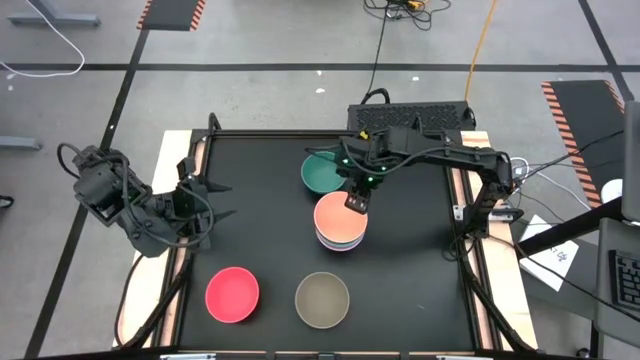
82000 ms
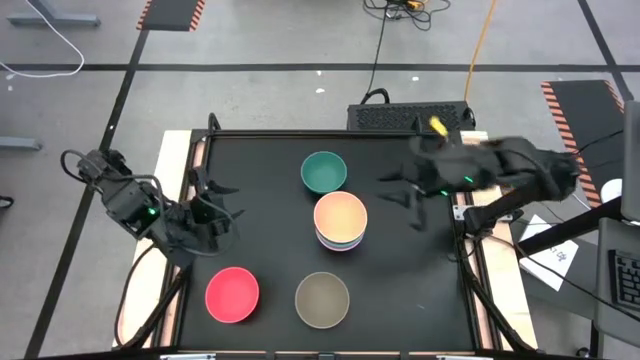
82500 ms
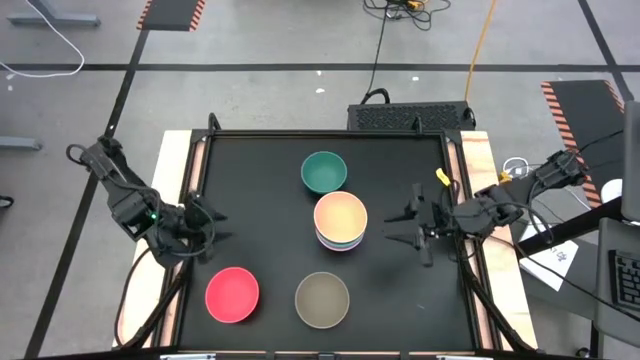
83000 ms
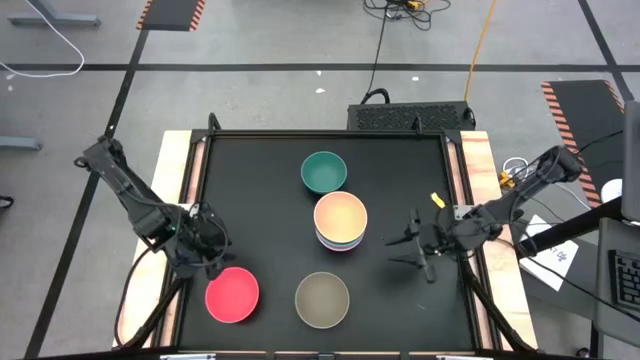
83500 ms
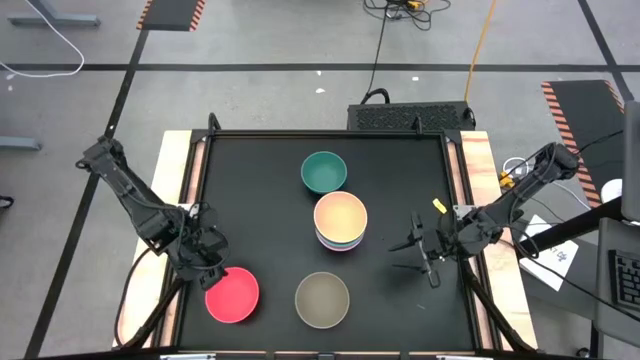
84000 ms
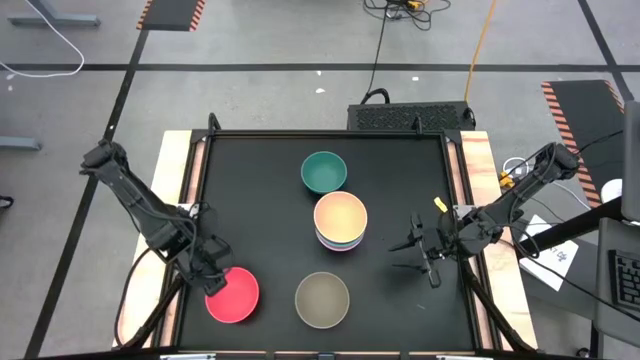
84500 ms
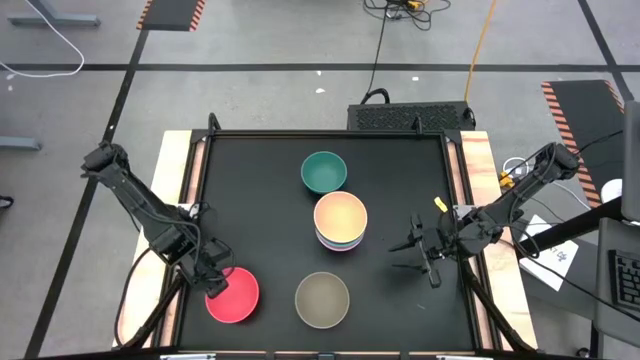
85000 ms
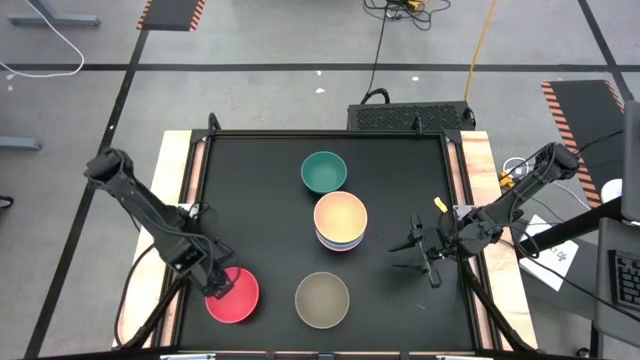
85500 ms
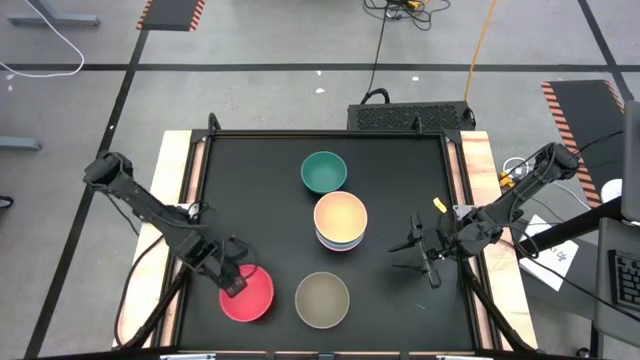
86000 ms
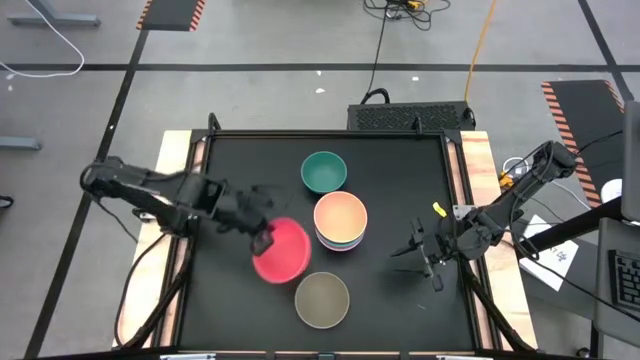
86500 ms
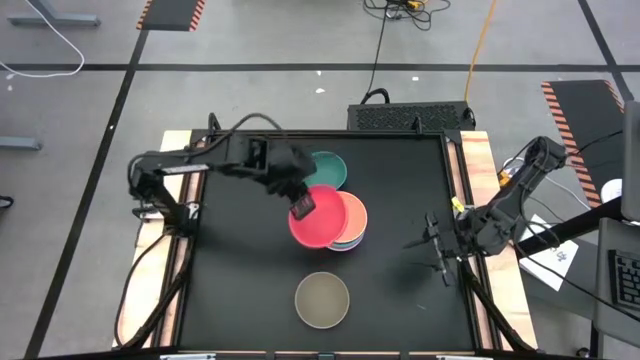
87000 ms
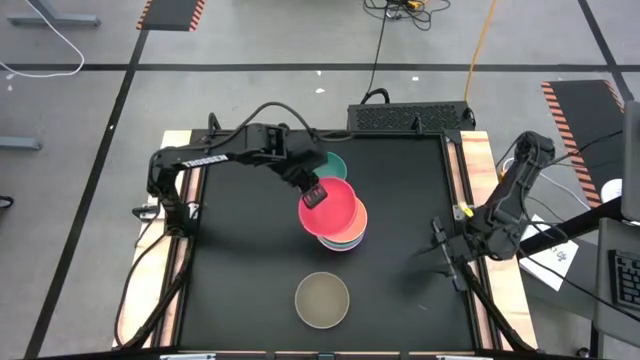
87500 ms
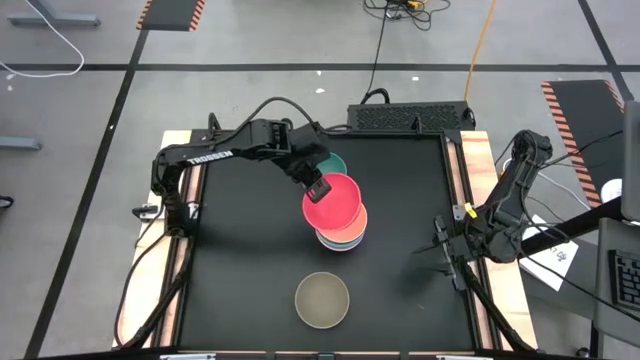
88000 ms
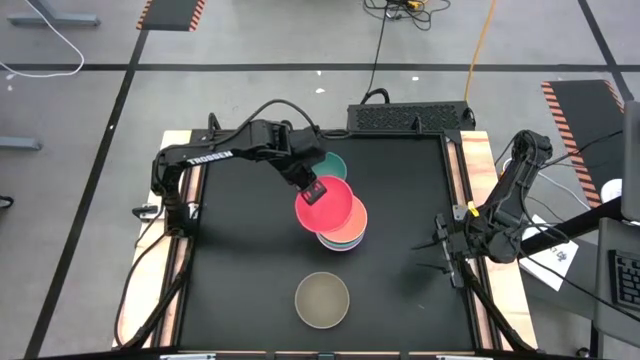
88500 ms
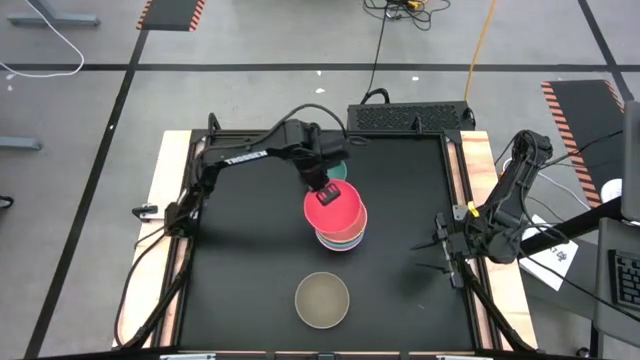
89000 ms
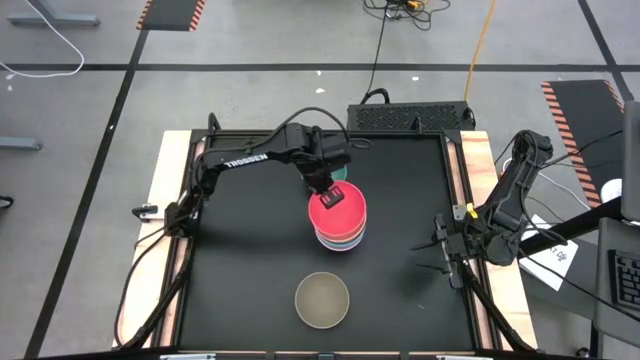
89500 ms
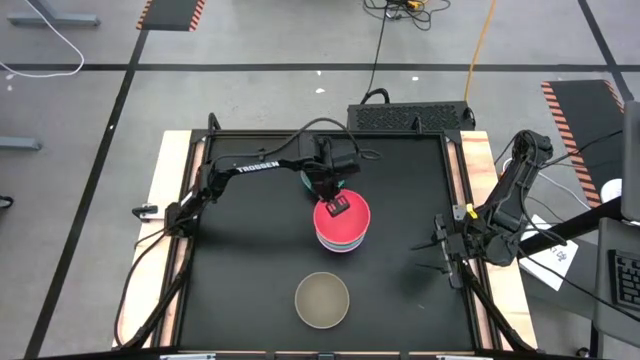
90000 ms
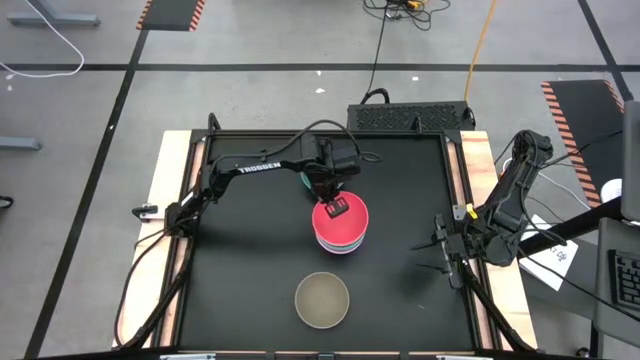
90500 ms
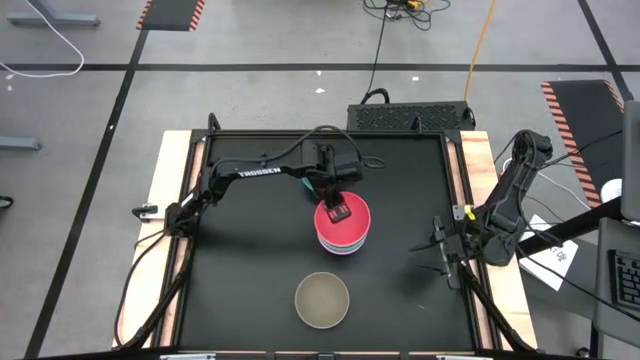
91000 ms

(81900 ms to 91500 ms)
Task: Nest bowls inside each other
Stack the light pink bowl on top of the light orange bowl

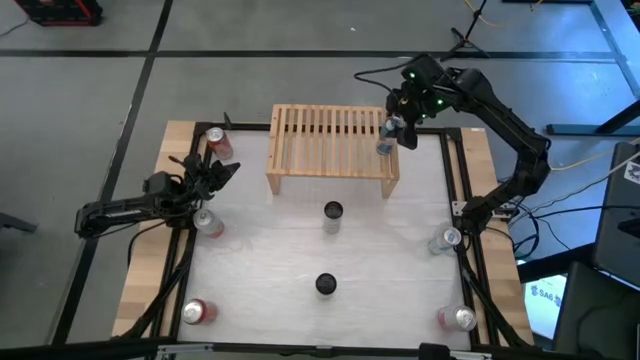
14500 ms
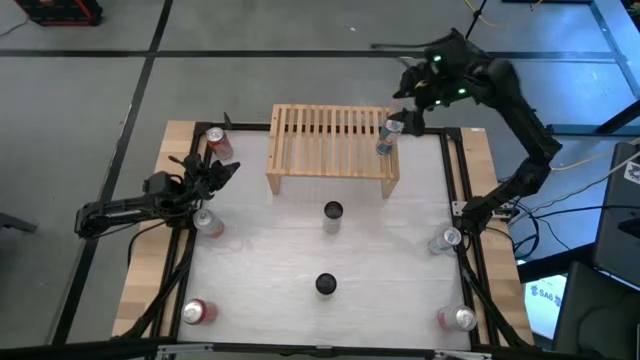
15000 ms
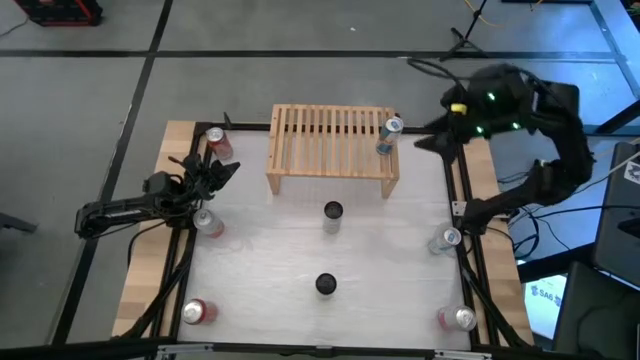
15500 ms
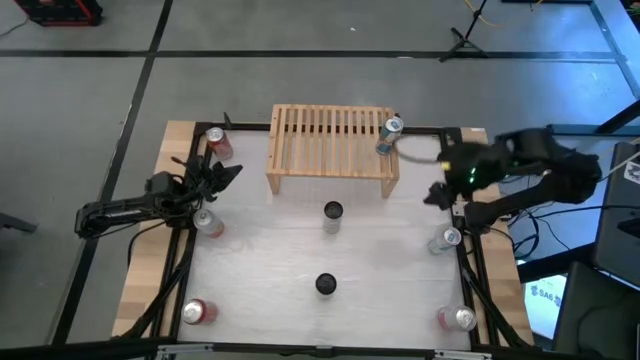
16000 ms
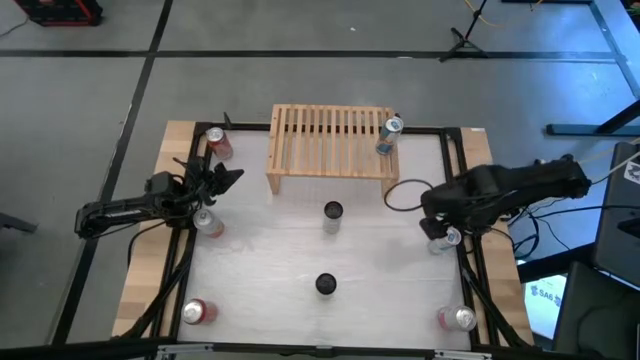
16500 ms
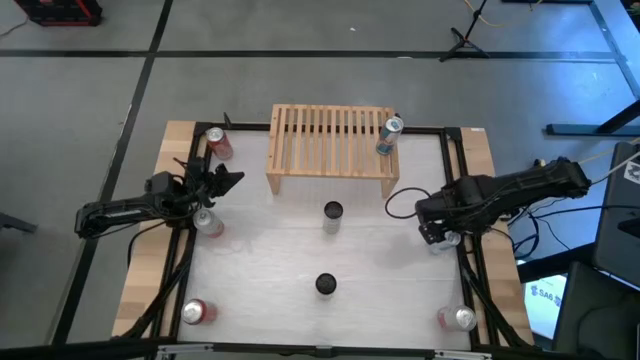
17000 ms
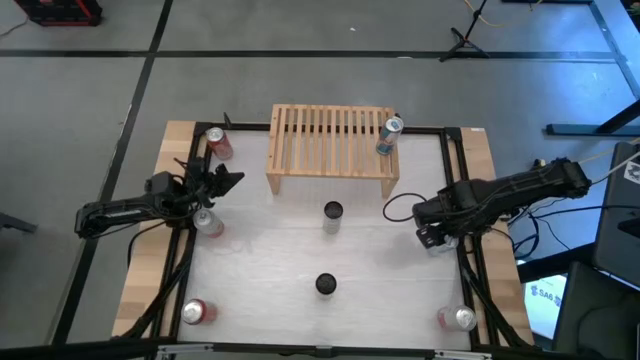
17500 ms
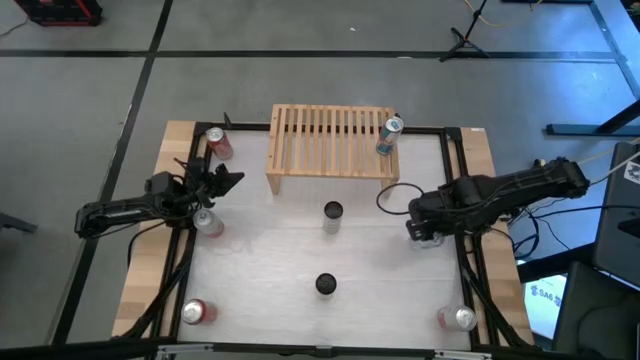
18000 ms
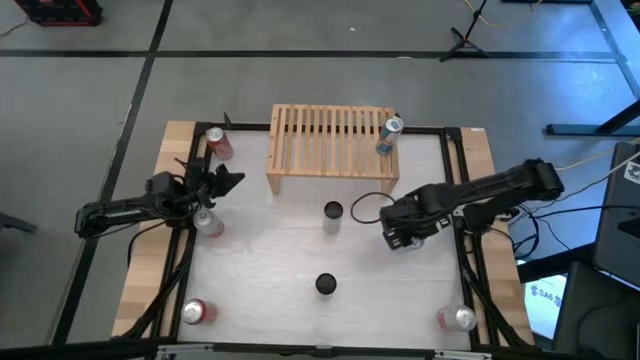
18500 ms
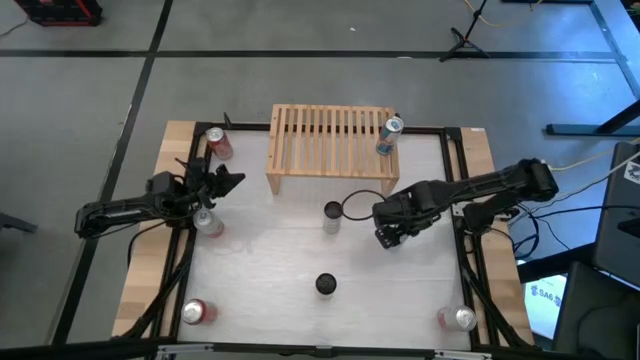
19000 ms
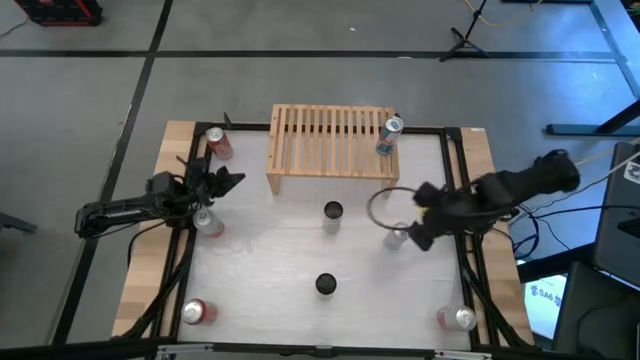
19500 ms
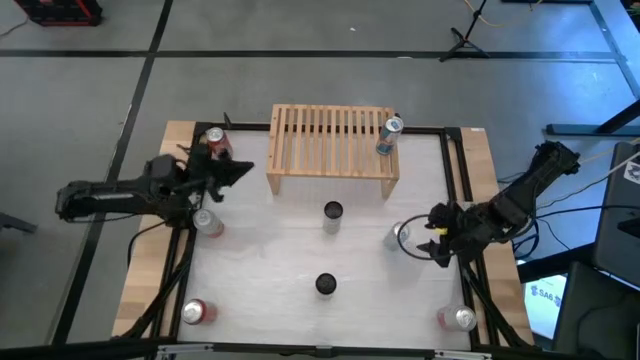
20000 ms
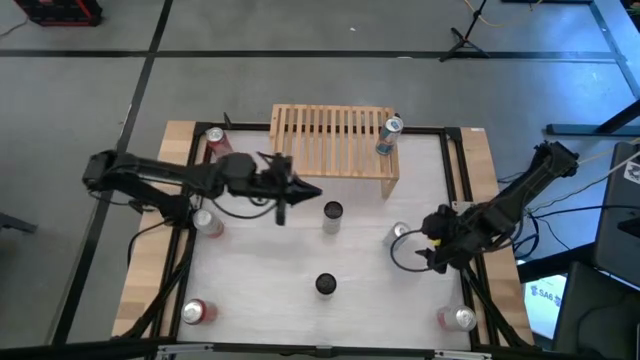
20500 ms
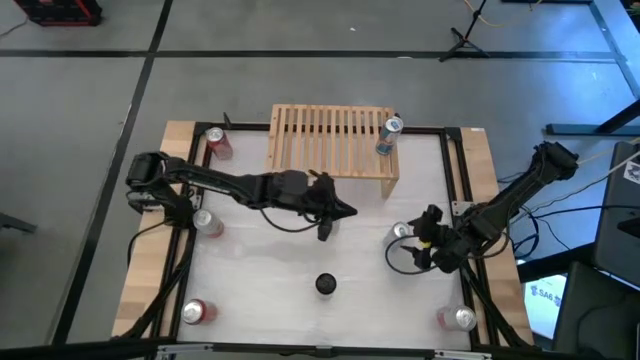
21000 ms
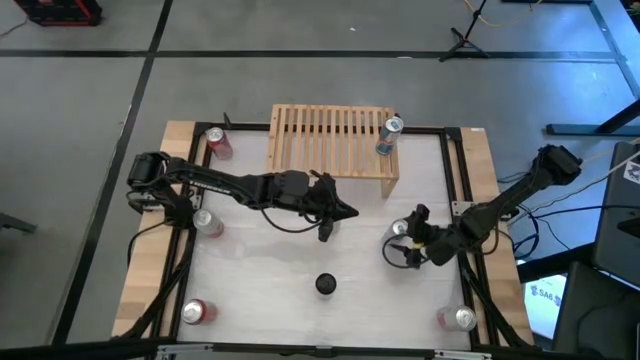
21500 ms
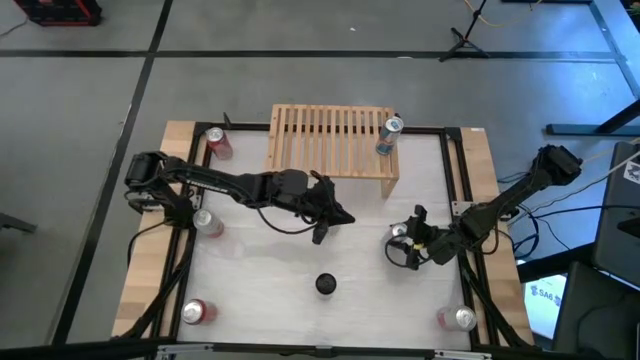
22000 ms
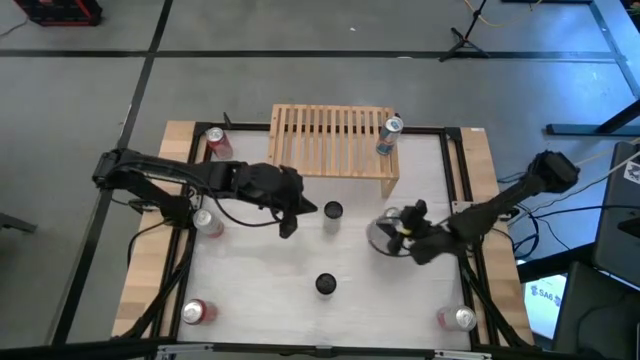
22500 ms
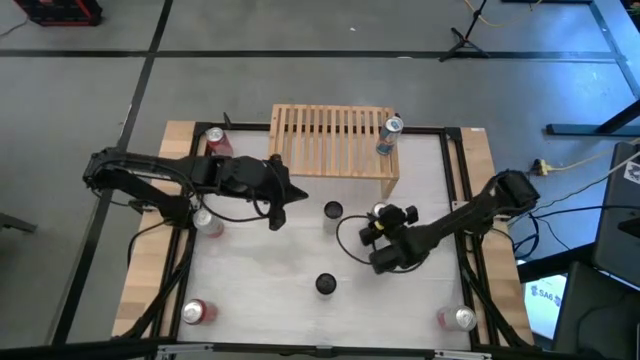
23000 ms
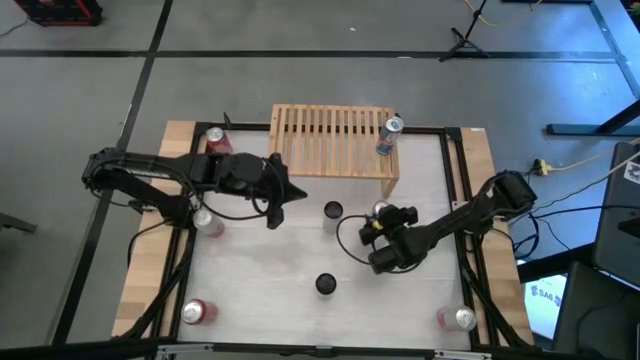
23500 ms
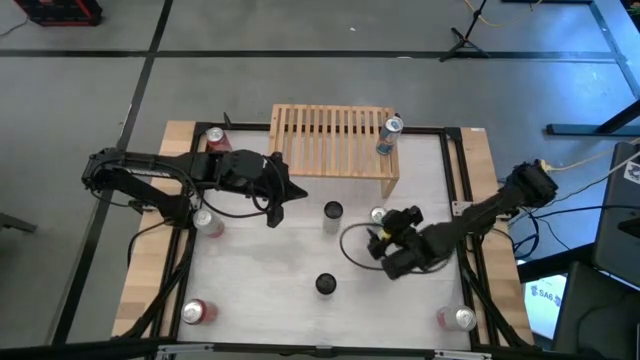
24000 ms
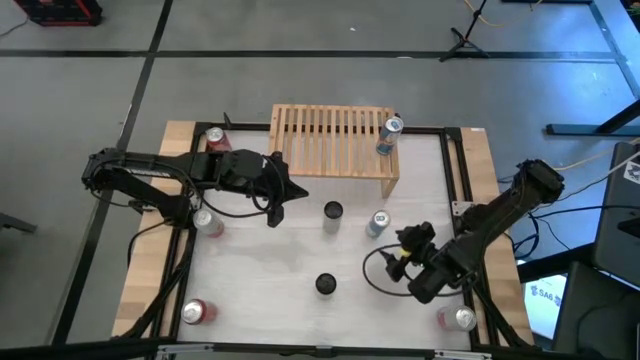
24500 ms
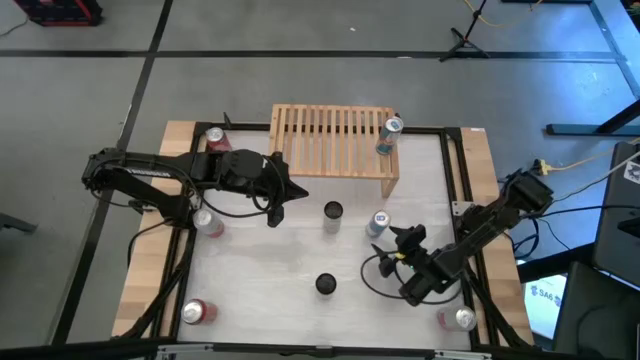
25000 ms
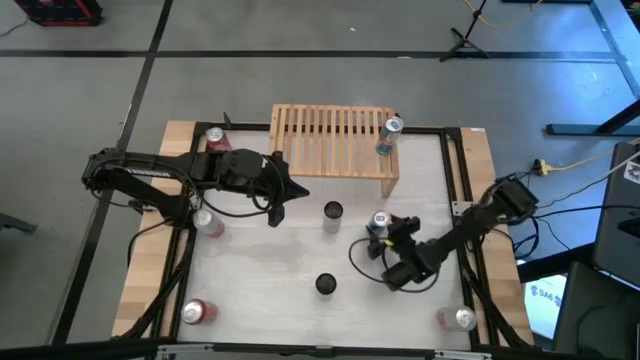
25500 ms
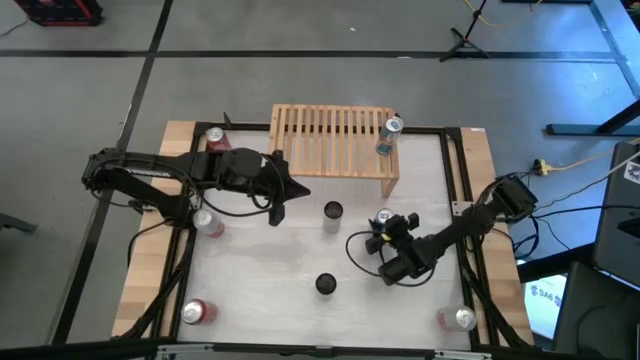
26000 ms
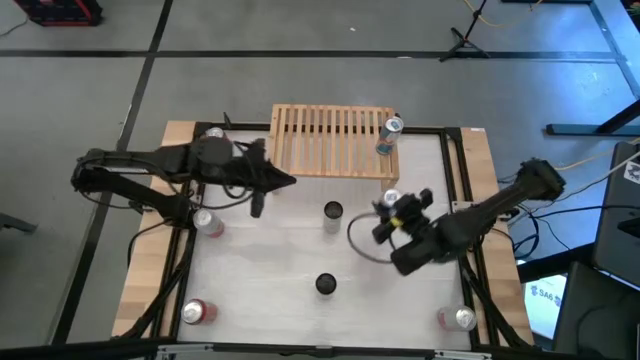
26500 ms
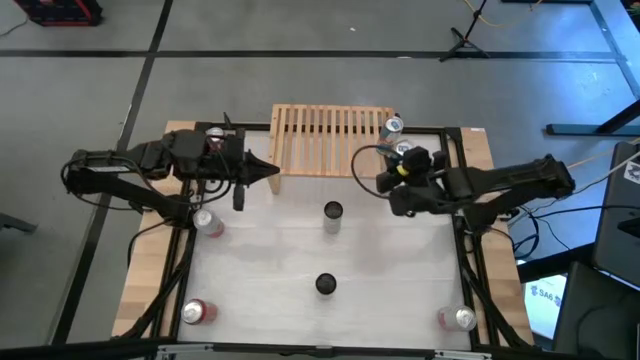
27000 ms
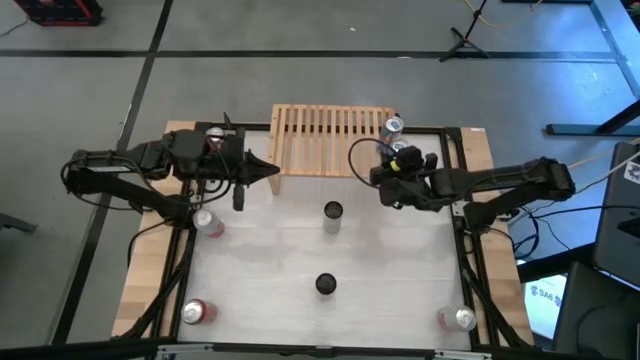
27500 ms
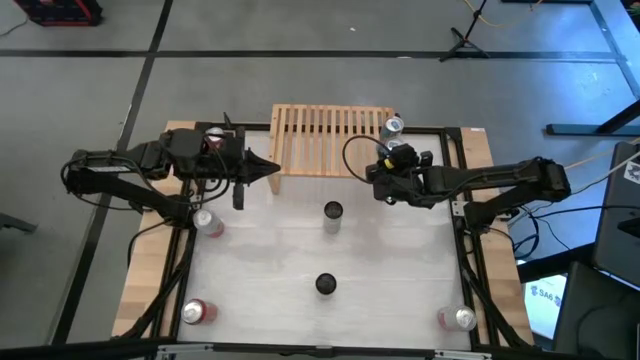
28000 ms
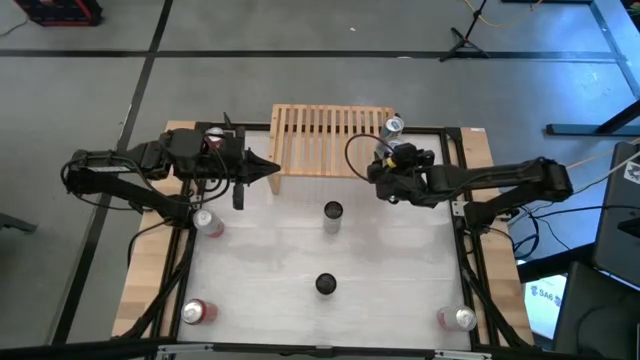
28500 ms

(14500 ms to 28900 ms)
Task: Place canned beverage on shelf
Put the blue soda can on the shelf aligned with the other blue soda can
